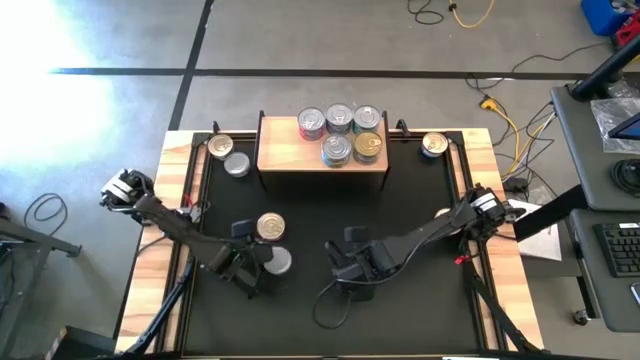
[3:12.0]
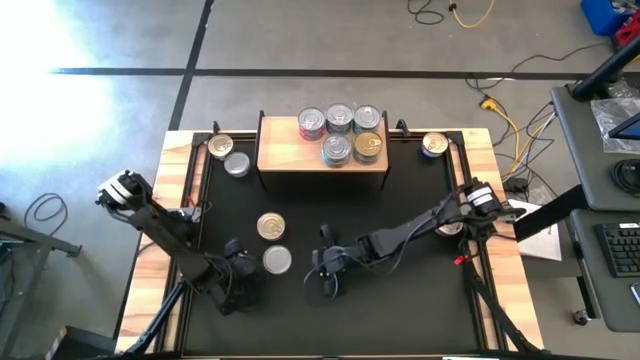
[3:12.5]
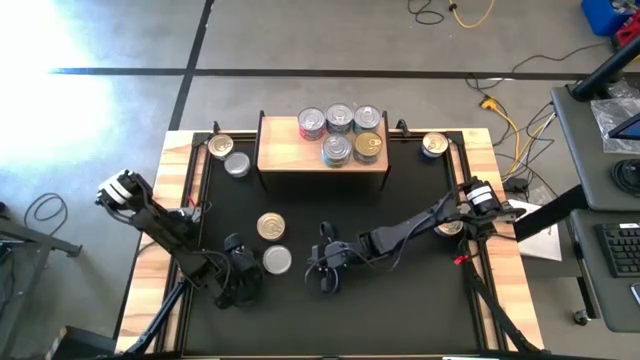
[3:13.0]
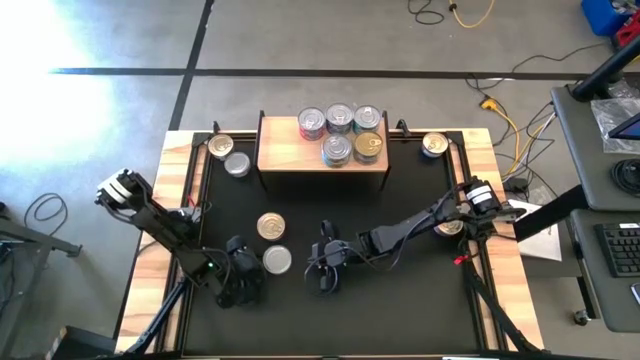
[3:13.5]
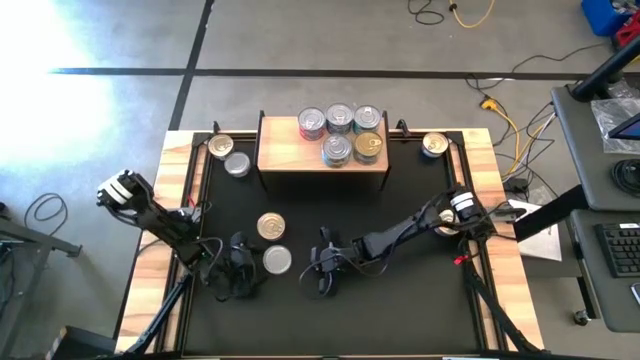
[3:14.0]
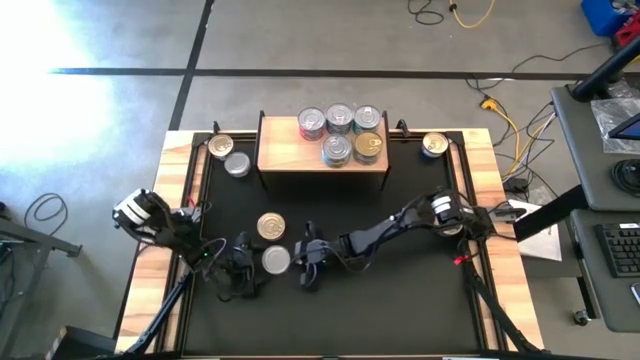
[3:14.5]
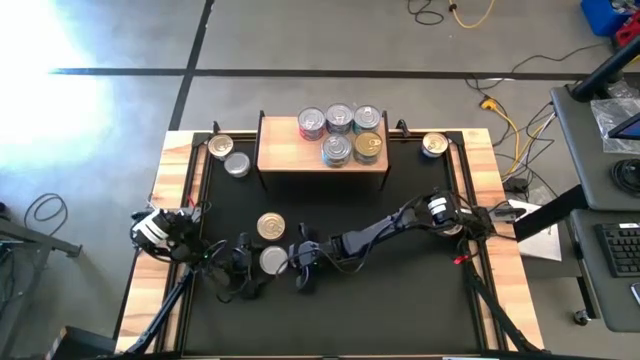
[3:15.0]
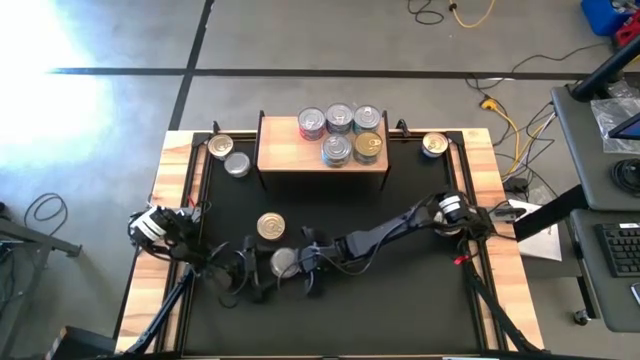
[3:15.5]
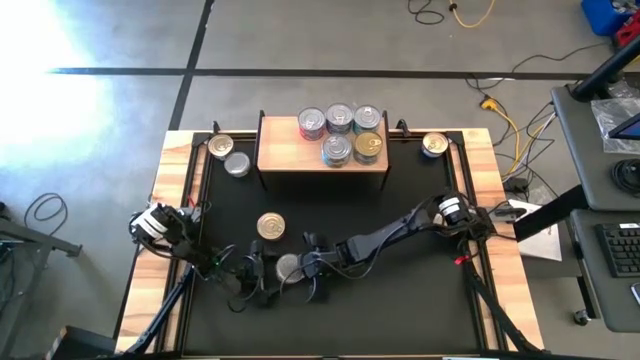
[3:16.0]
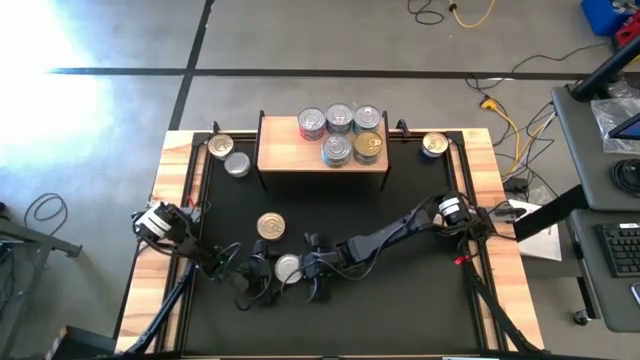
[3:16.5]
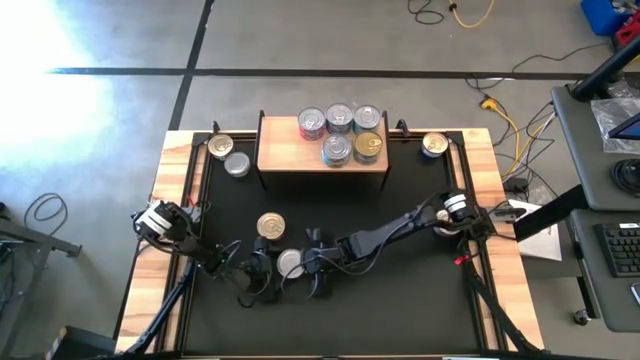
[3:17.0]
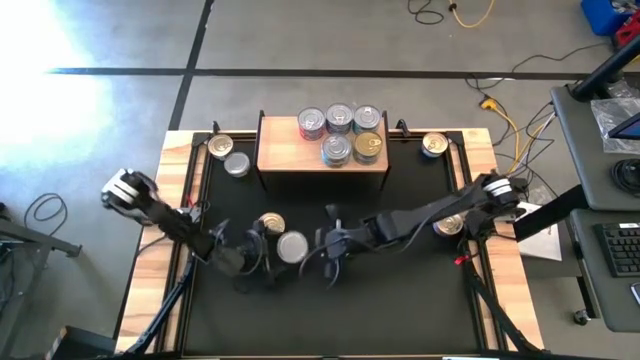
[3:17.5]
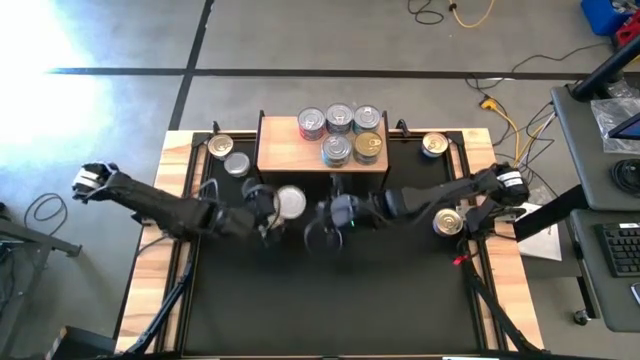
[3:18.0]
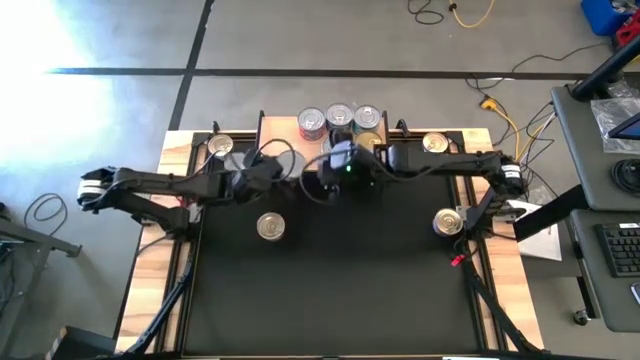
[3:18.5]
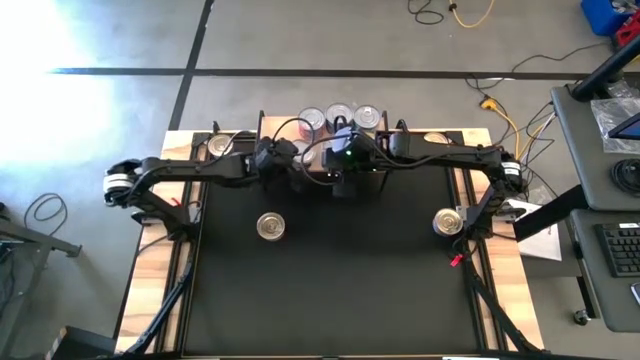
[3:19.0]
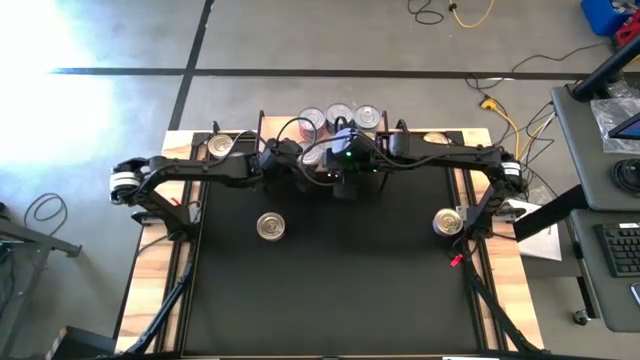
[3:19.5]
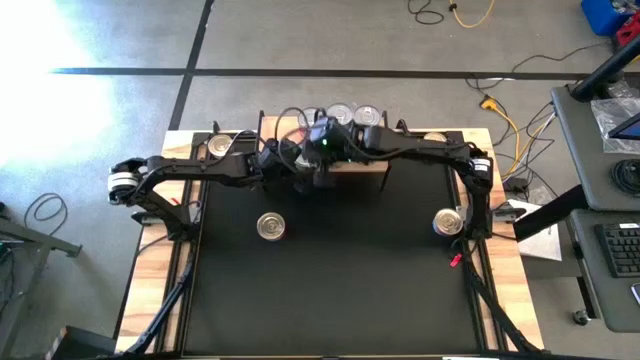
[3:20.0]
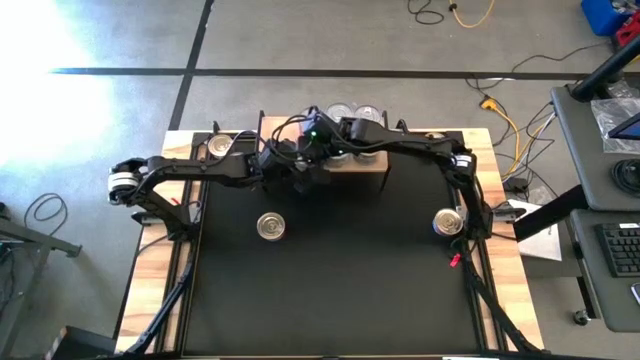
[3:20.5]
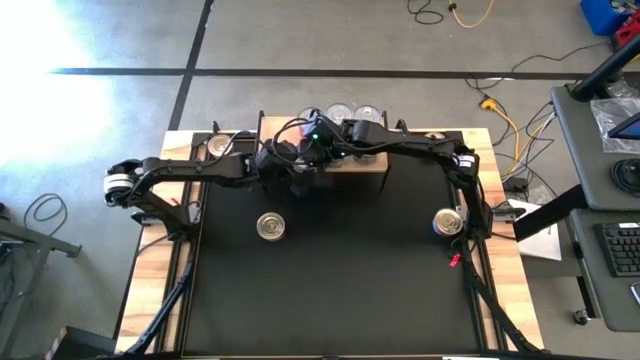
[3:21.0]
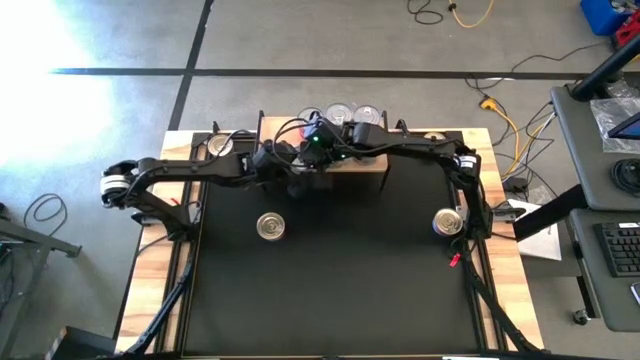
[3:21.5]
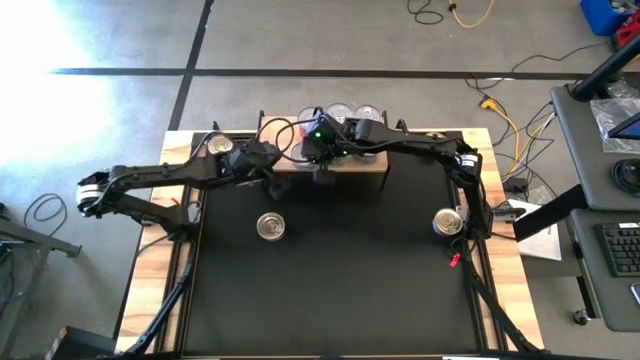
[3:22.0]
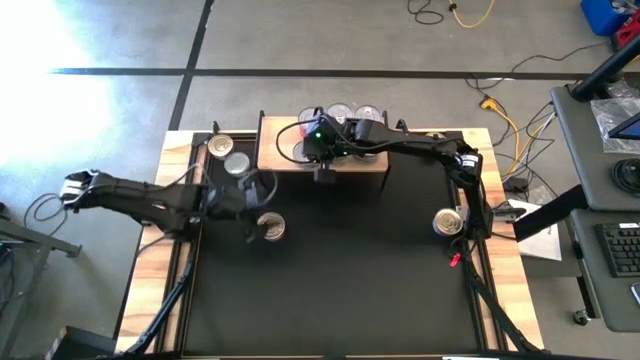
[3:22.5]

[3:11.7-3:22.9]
Task: Stack canned seafood by type on shelf
Put the bottom white green tuna can on the shelf

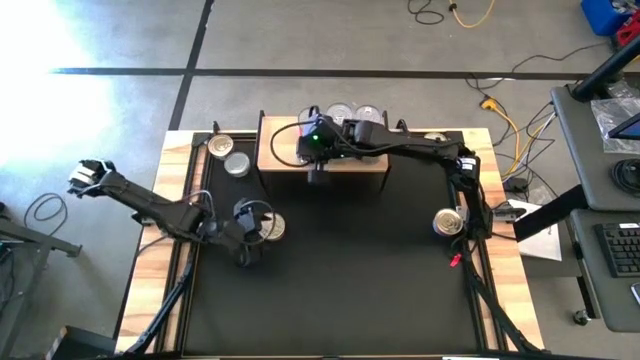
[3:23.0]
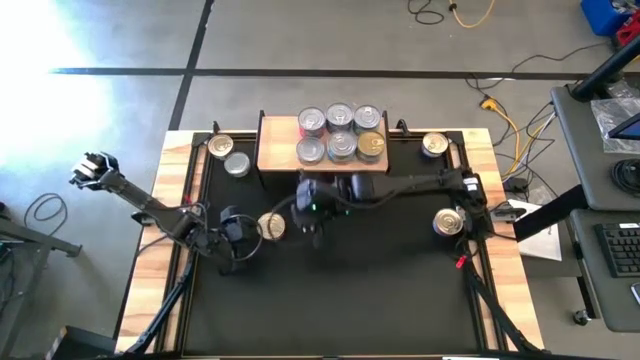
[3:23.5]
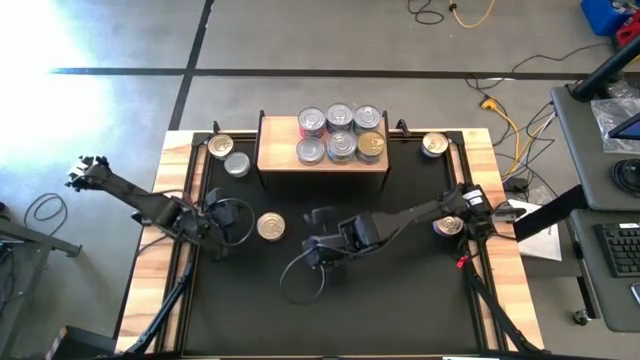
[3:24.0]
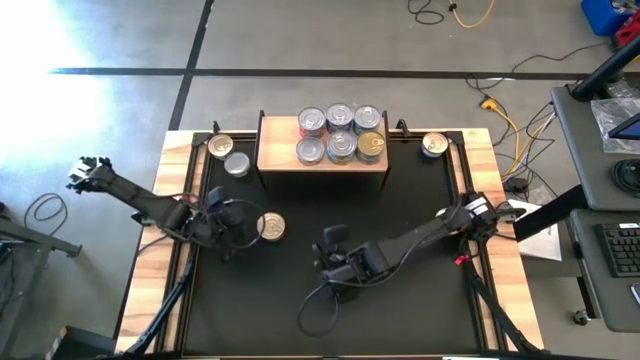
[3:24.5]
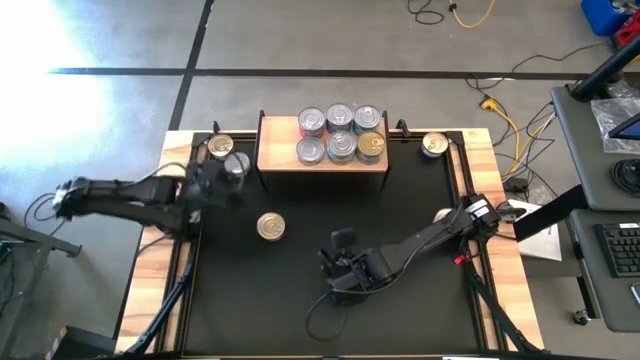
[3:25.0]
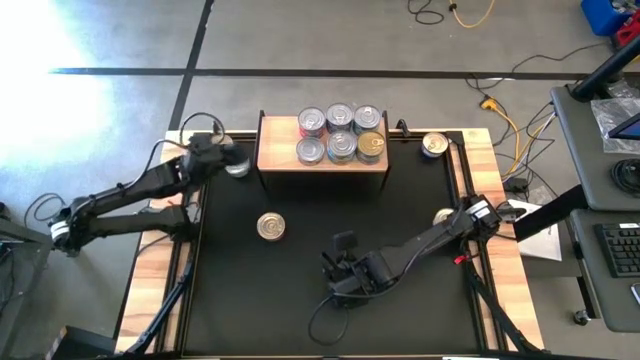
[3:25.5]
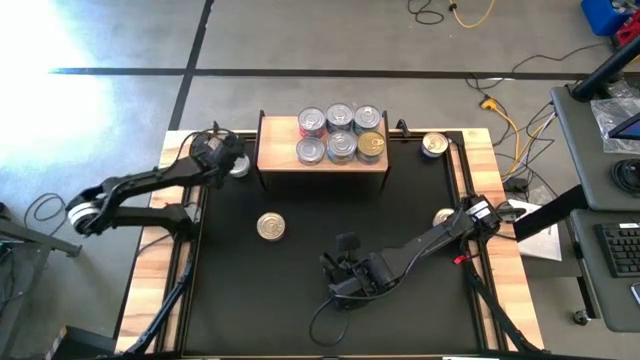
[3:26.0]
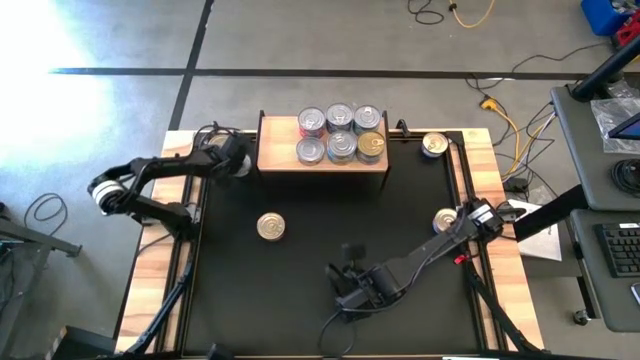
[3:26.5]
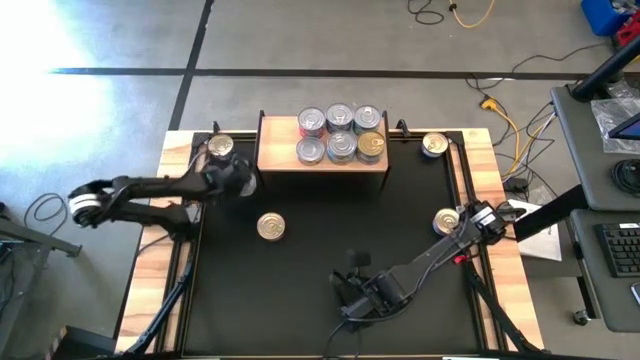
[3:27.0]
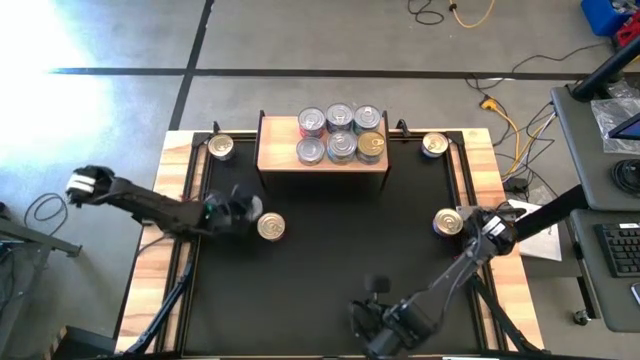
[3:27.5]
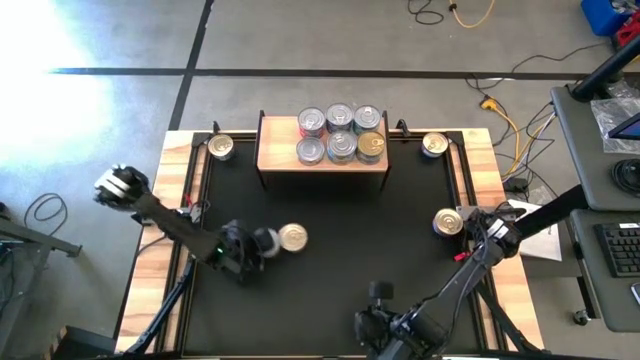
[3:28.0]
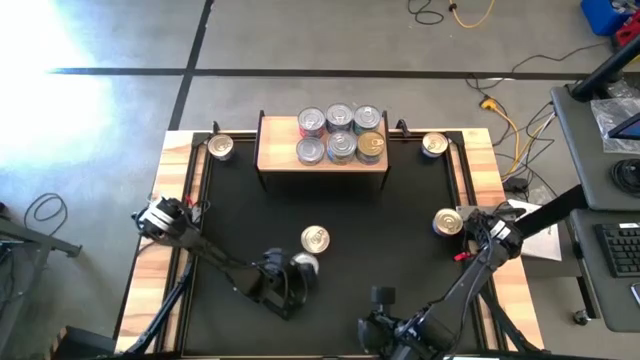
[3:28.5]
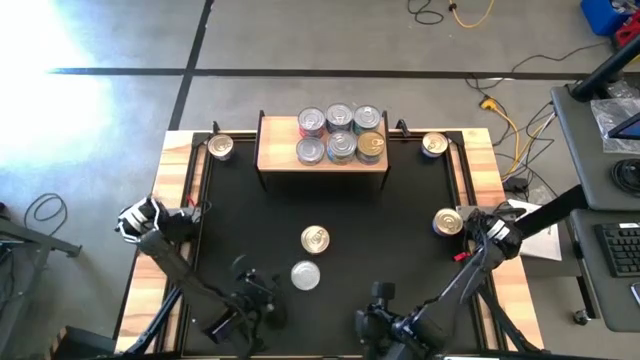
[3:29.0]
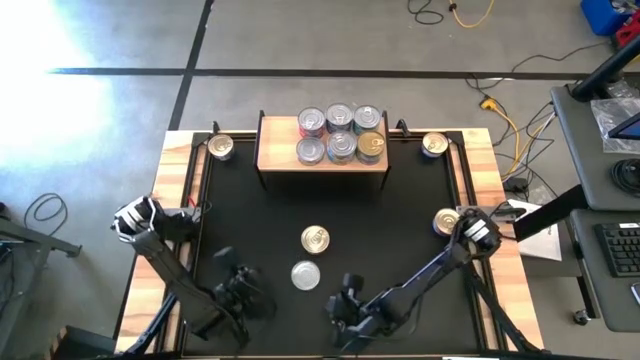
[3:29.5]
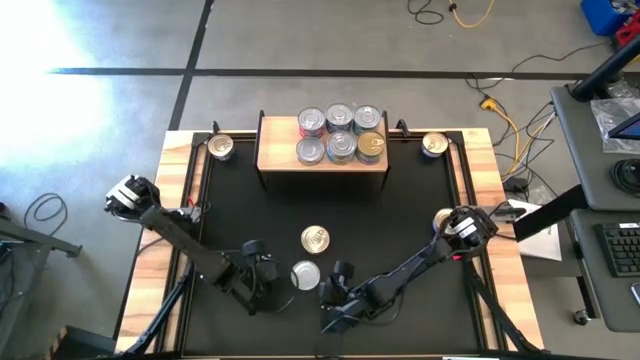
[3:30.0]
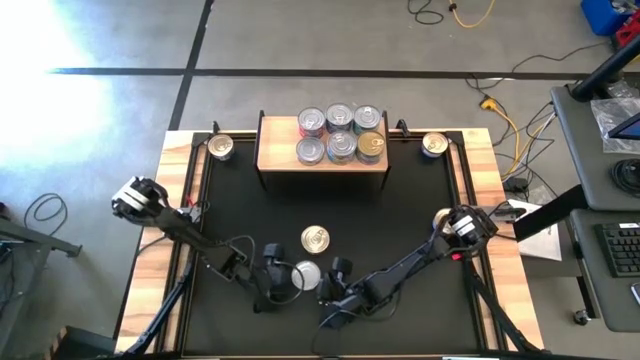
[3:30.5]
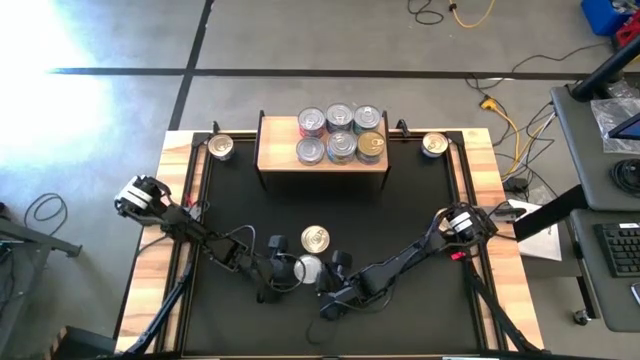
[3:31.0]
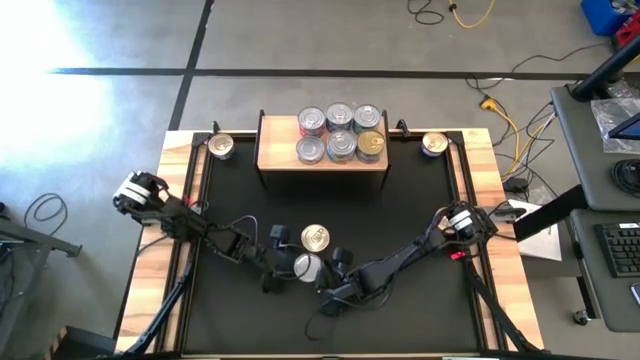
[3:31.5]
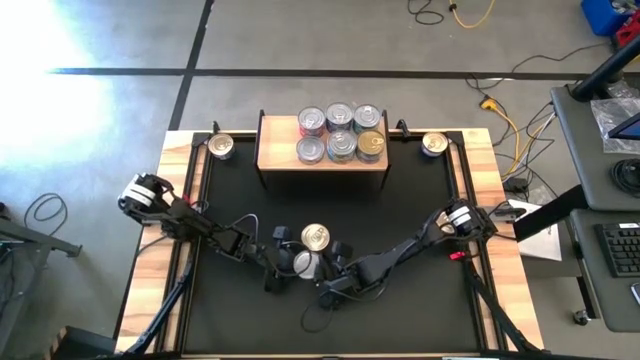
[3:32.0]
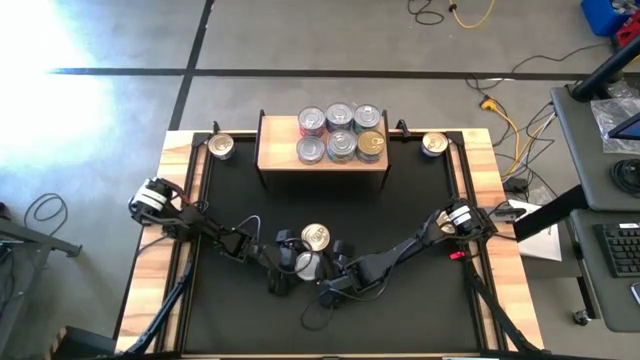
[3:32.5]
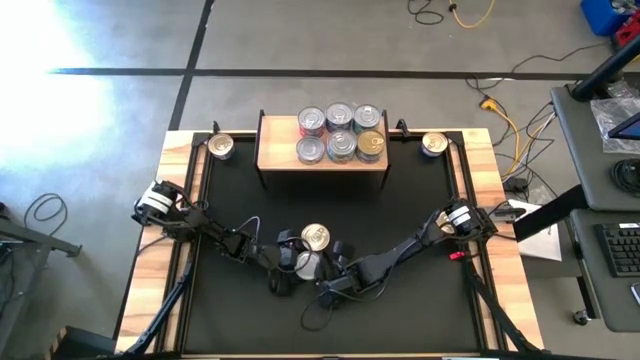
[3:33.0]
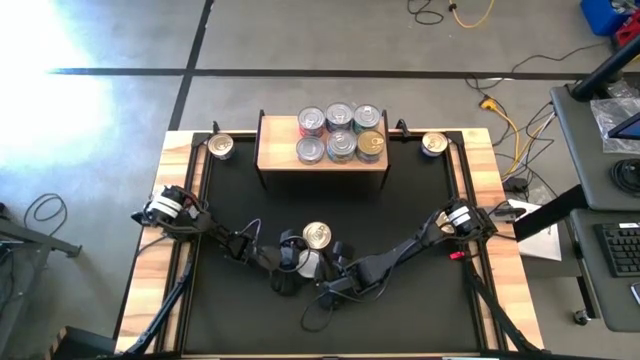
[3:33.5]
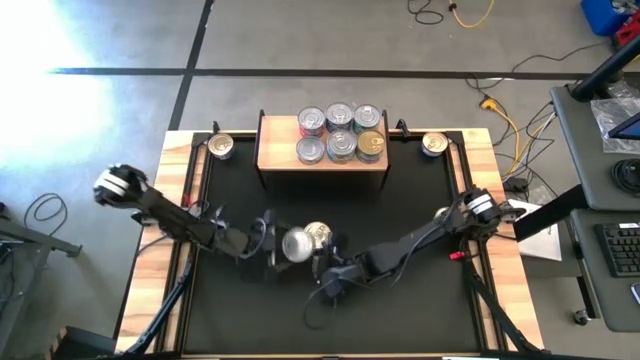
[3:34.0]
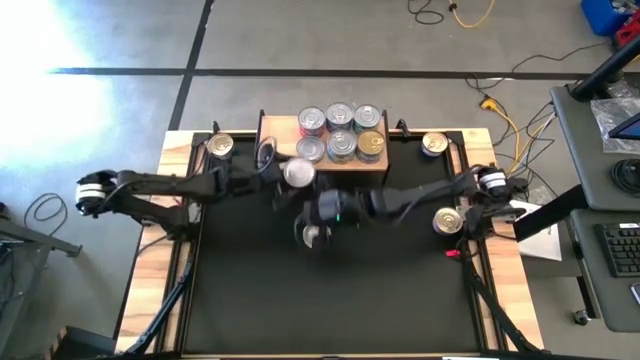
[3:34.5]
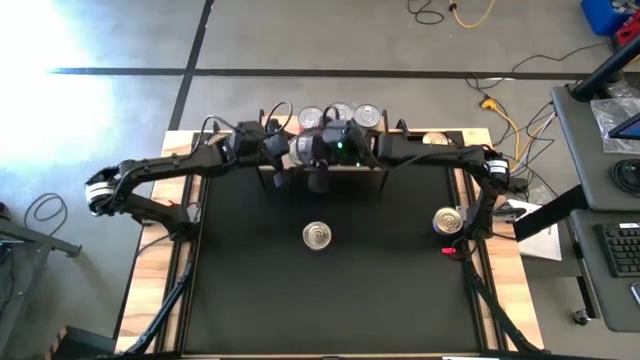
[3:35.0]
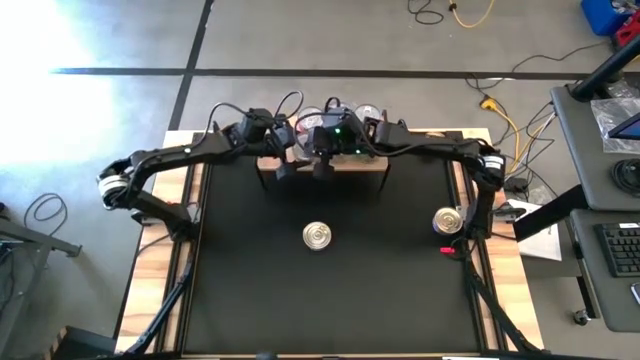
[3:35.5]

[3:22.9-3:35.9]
Stack the white green tuna can on top of the white green tuna can on the shelf
